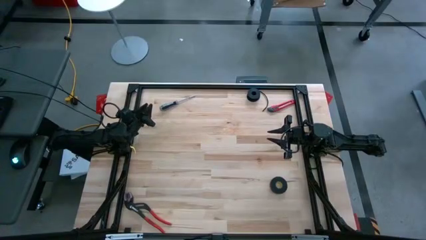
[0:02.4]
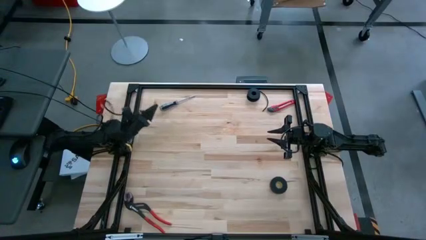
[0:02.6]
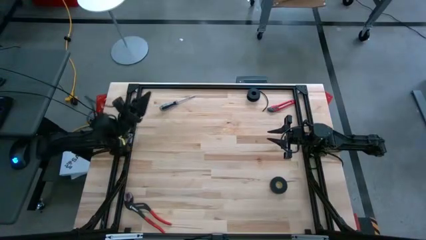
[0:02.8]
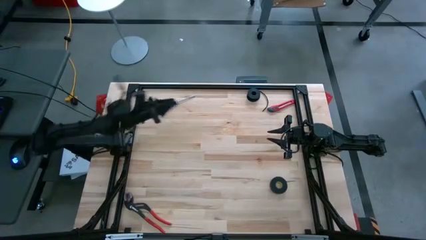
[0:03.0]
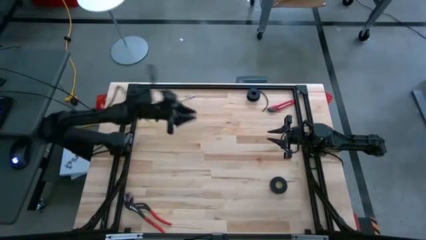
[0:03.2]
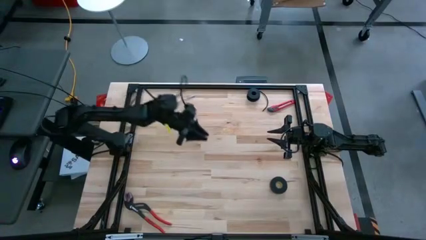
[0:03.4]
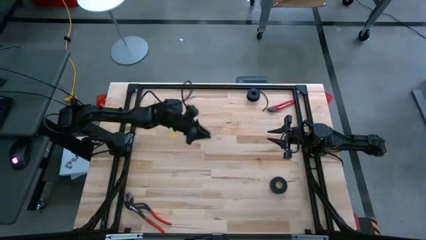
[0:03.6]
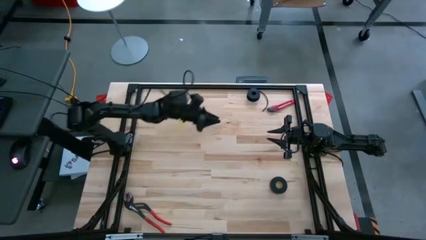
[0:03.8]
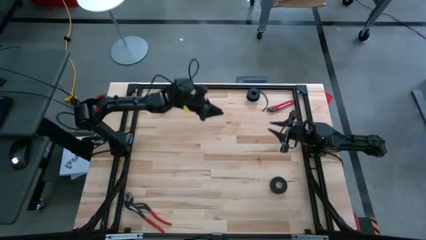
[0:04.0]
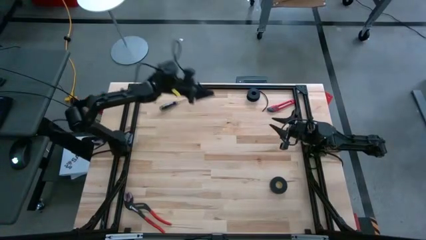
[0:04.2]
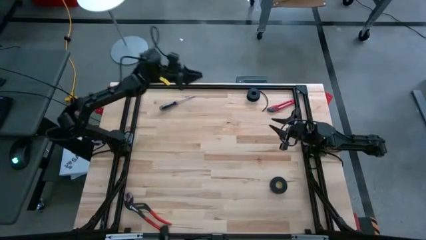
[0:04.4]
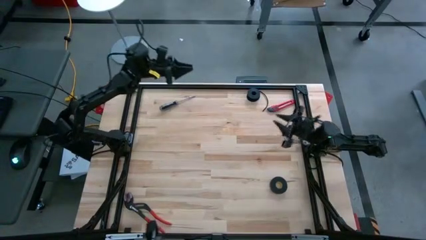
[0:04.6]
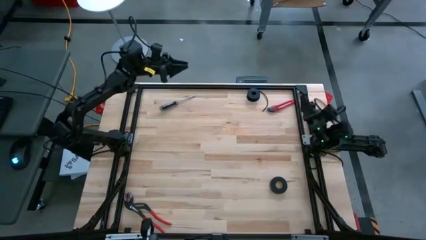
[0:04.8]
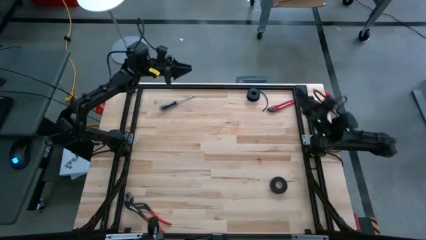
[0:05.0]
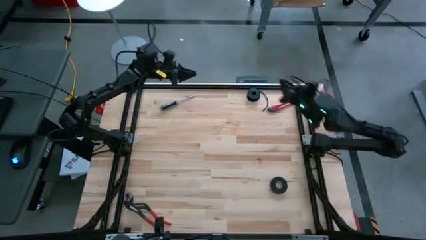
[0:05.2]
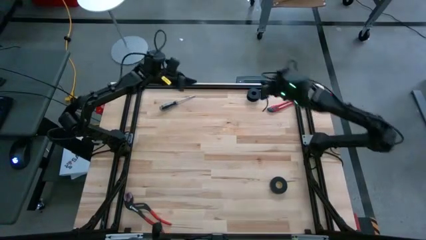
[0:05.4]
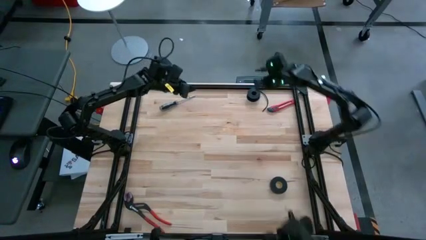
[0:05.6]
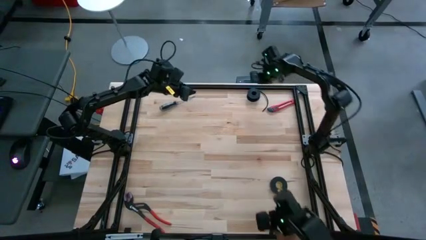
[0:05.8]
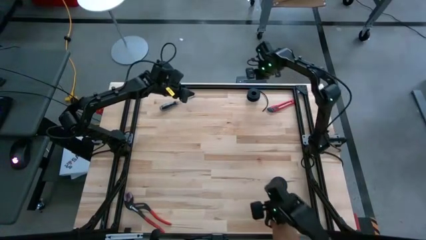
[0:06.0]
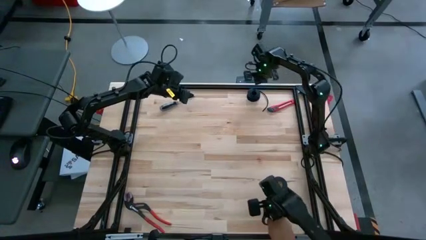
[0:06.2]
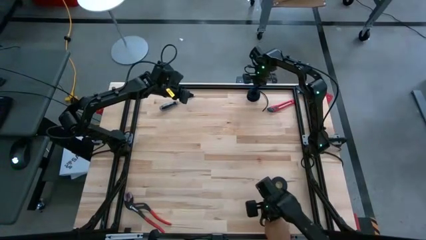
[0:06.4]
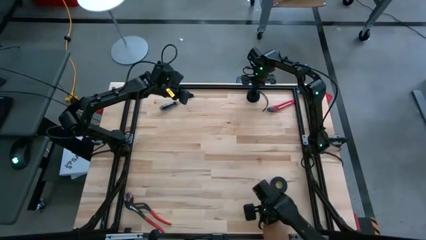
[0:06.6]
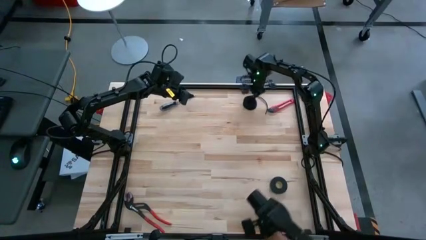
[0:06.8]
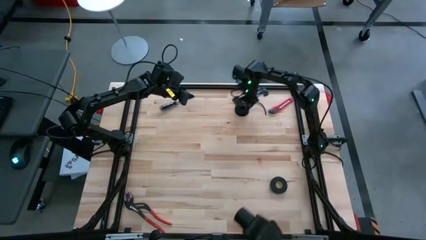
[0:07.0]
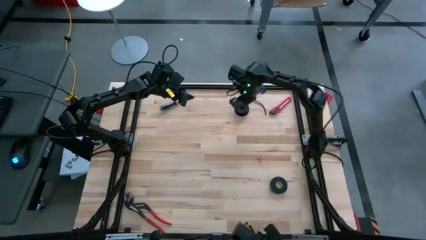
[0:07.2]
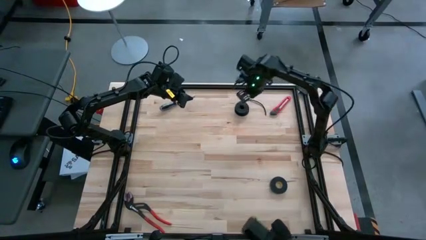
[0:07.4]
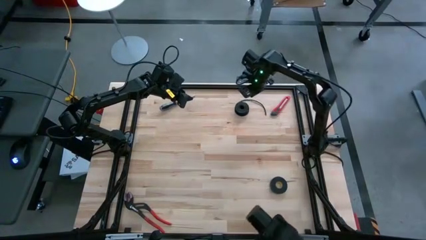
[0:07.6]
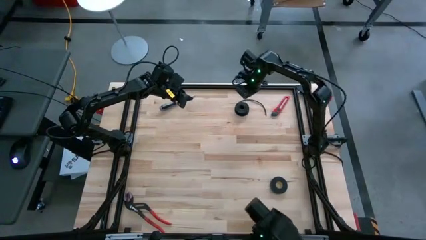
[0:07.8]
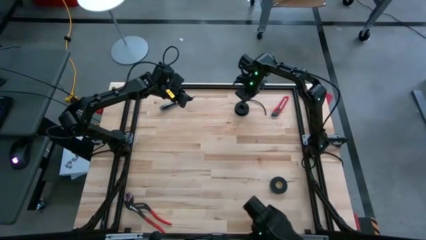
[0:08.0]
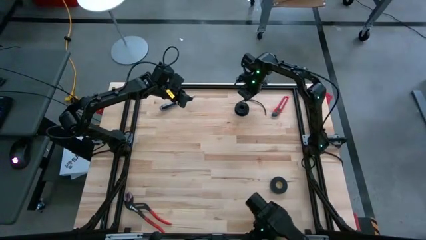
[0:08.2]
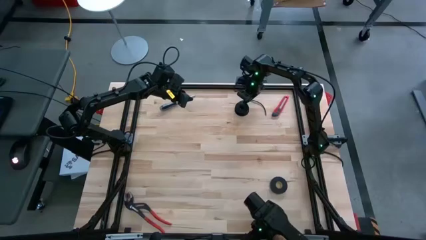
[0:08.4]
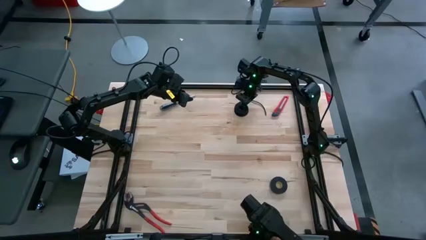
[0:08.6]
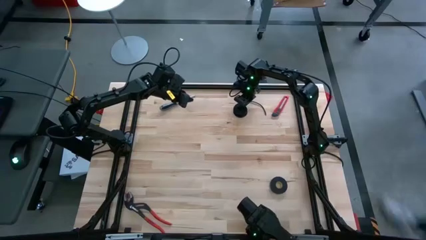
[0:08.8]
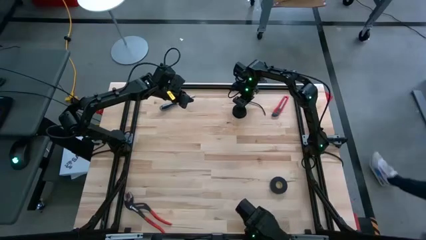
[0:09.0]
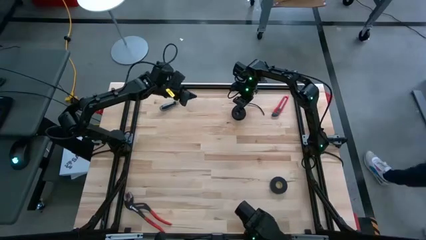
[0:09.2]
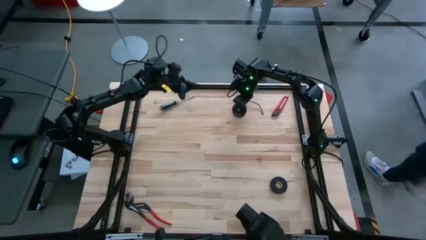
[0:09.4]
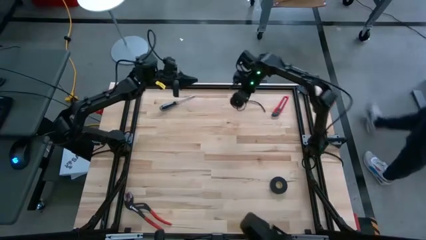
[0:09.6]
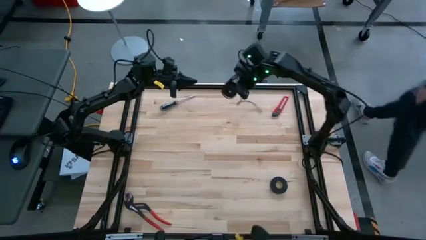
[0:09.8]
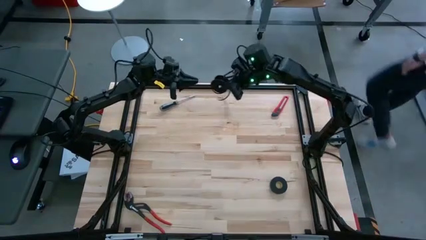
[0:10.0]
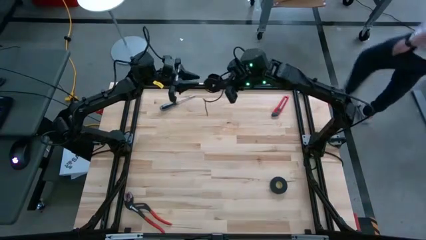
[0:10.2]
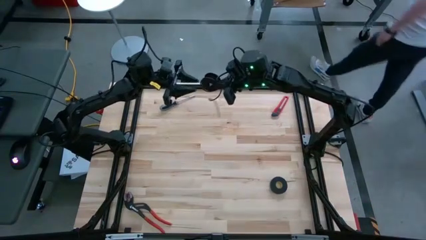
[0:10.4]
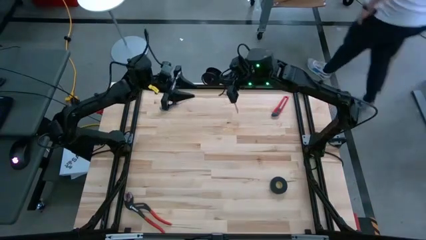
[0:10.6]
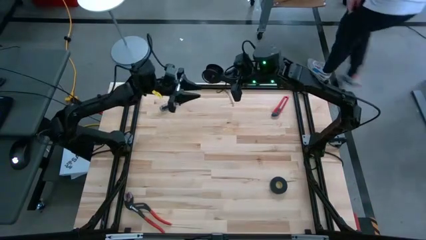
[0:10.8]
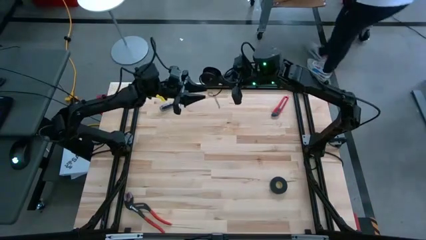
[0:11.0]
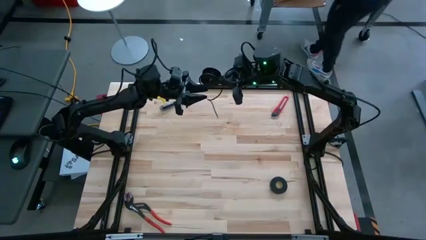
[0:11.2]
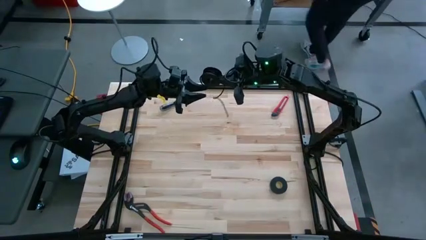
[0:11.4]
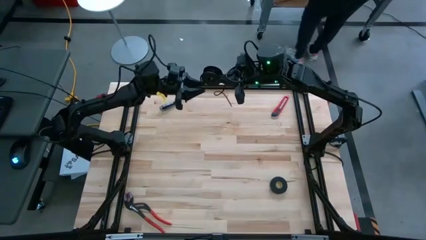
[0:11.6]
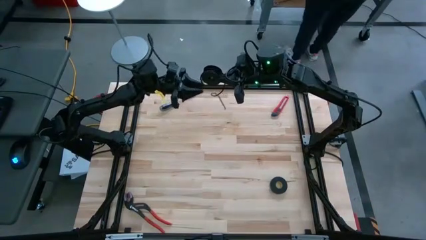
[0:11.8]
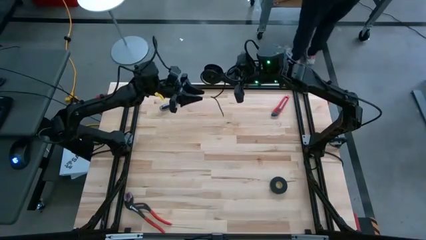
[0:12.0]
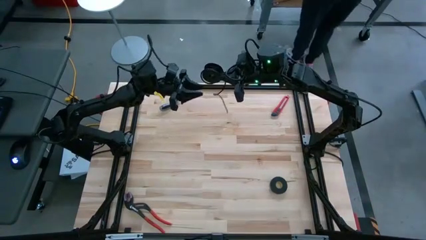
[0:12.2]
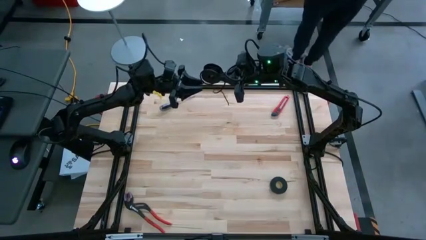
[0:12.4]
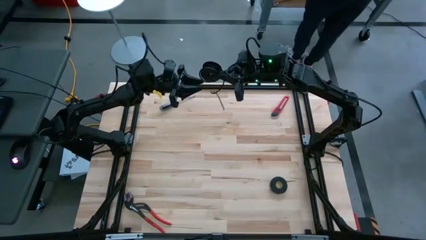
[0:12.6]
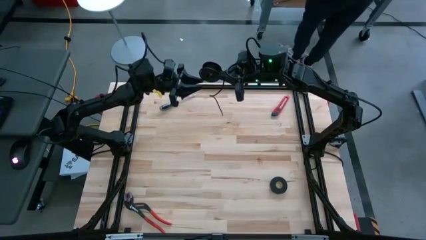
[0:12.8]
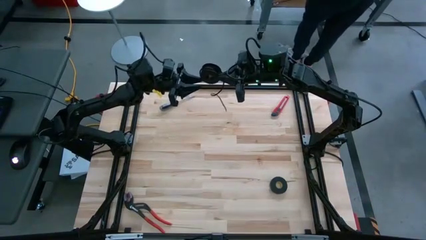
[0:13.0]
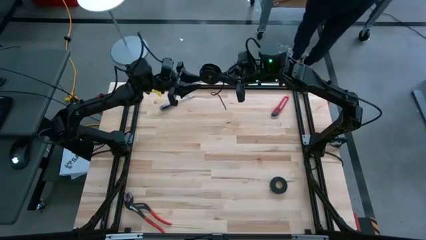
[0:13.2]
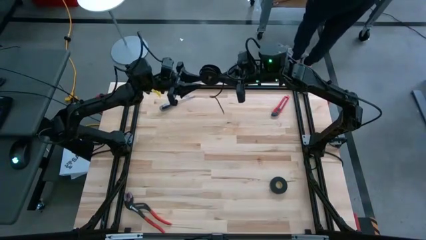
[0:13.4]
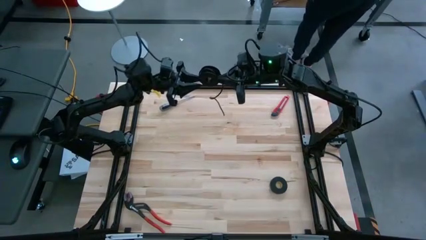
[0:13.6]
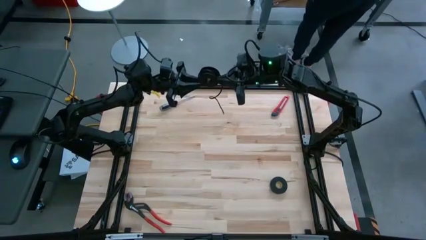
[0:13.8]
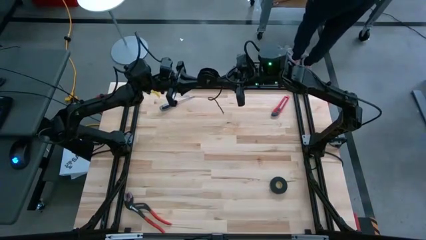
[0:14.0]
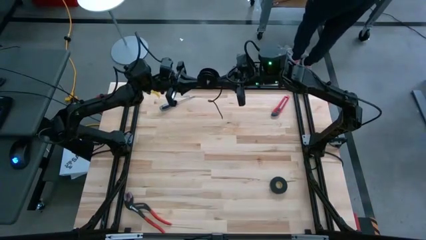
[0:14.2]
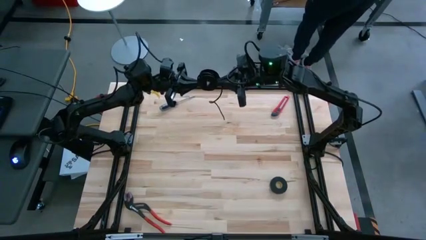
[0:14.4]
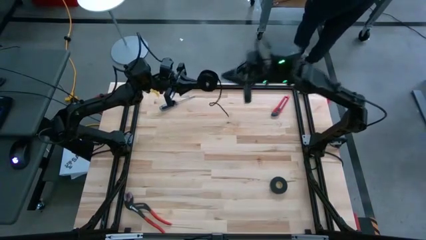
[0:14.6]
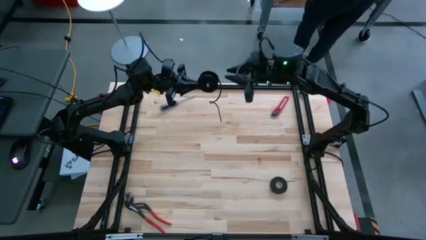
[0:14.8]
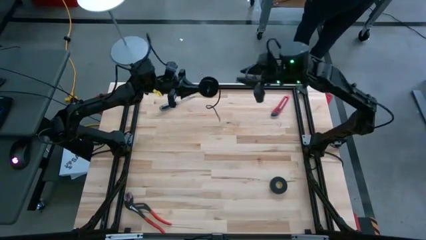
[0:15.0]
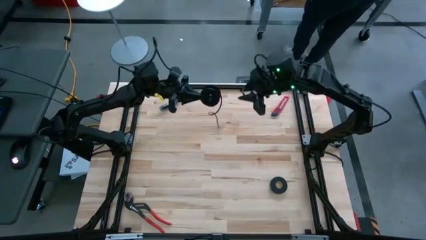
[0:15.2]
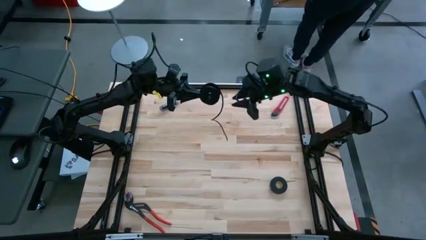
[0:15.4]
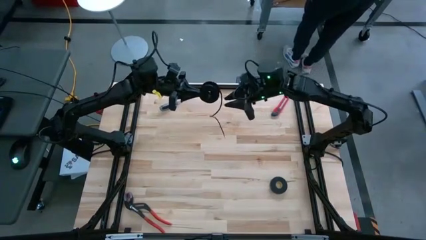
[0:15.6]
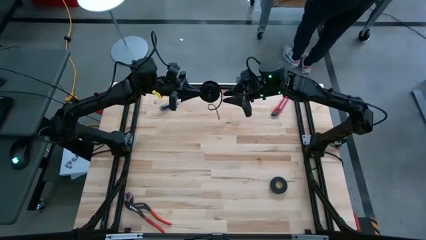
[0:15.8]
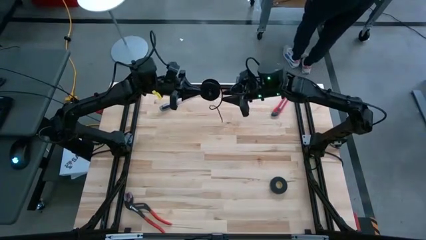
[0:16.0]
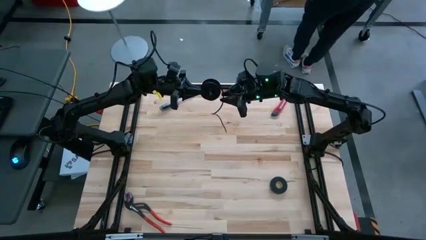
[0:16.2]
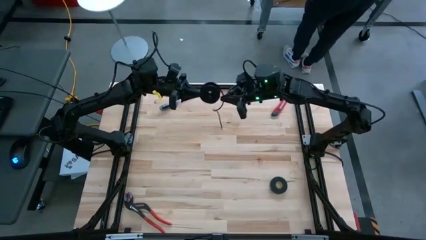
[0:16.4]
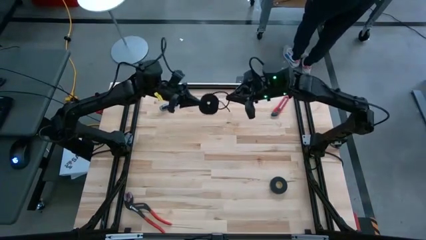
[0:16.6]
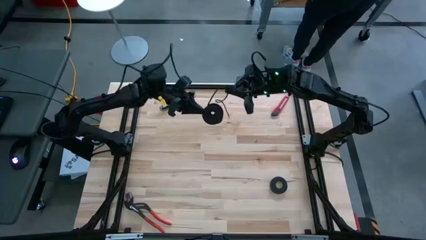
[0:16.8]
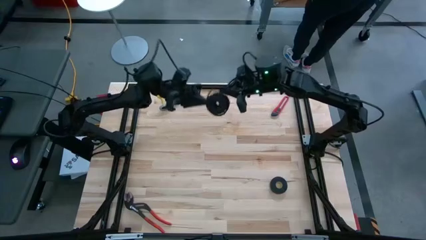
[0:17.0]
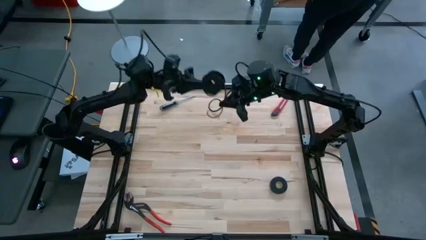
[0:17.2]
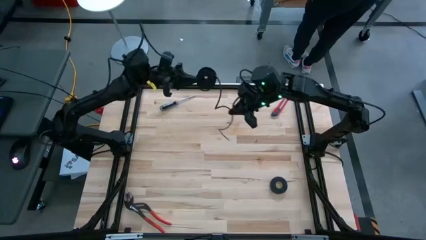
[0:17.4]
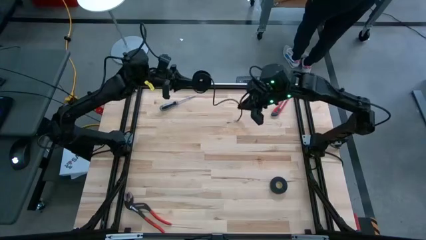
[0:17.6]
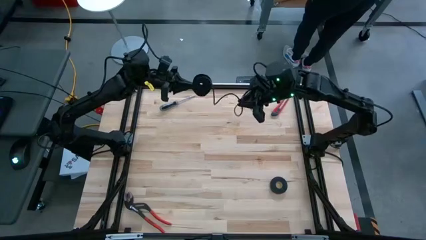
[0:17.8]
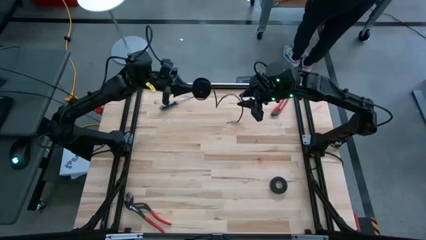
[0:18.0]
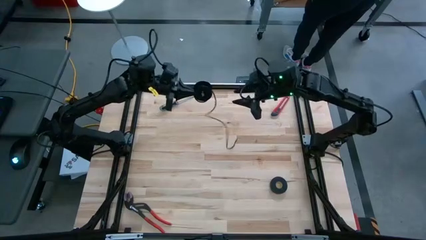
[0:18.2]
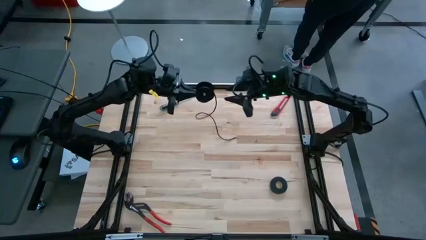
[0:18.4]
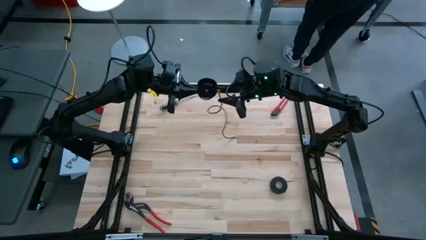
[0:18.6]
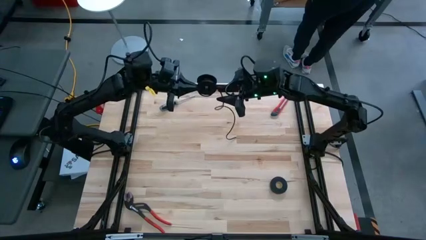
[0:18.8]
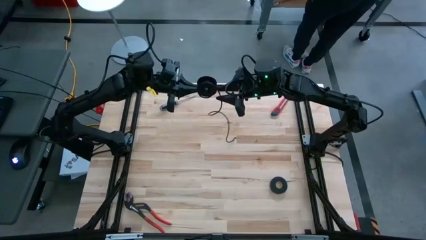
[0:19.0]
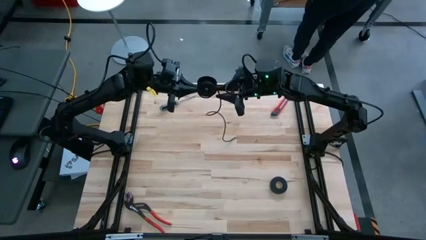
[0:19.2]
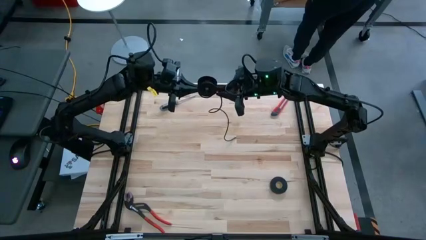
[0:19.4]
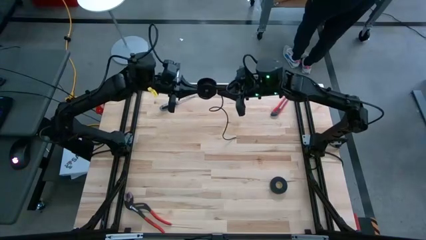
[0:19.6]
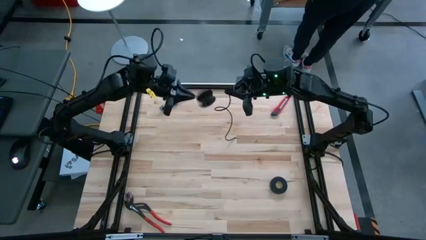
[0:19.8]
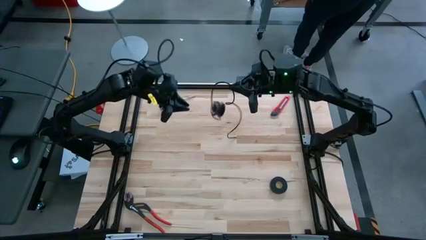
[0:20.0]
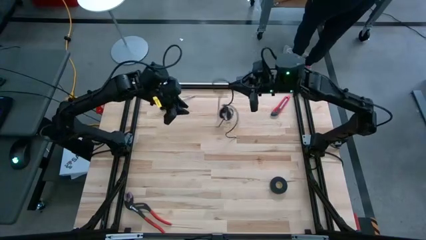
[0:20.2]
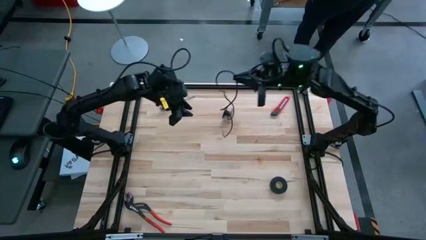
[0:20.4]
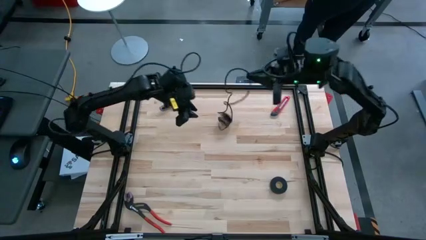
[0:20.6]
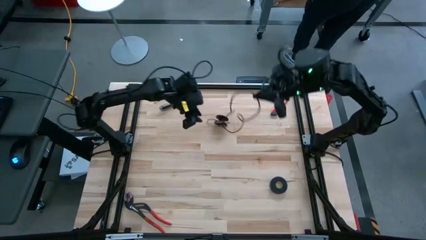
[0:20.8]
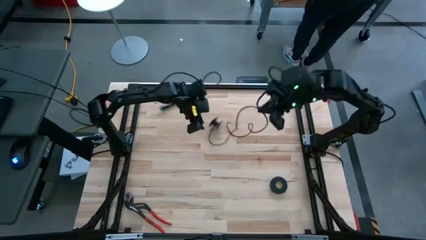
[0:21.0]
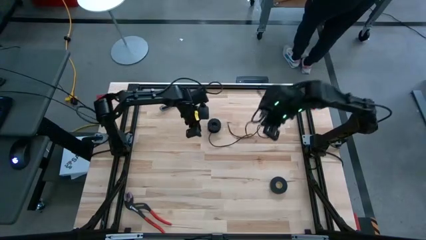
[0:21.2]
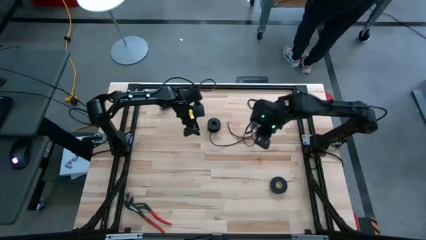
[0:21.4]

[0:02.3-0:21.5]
Task: Coil cords
Uncoil the black wire from the black spool
